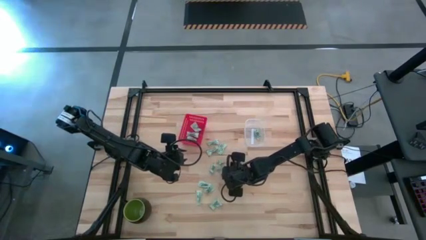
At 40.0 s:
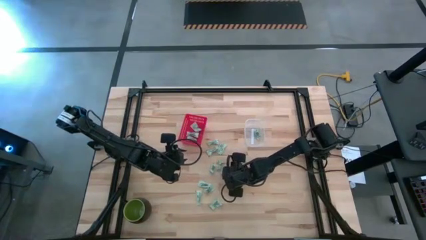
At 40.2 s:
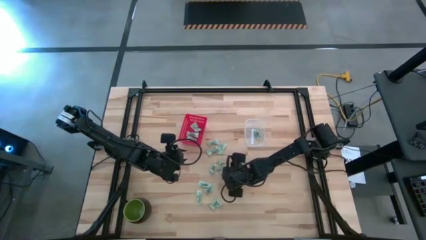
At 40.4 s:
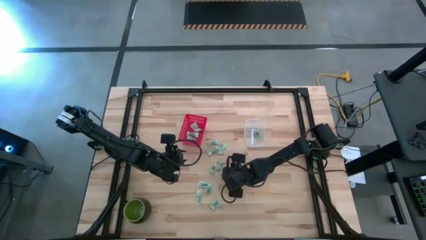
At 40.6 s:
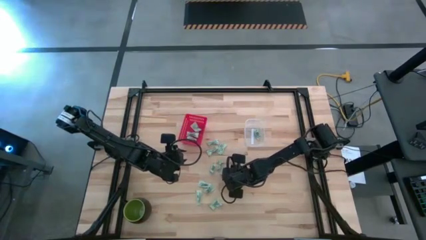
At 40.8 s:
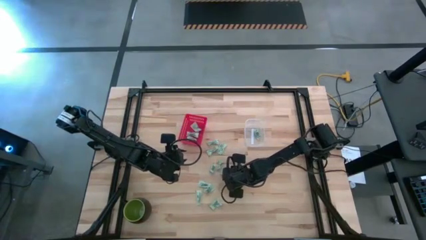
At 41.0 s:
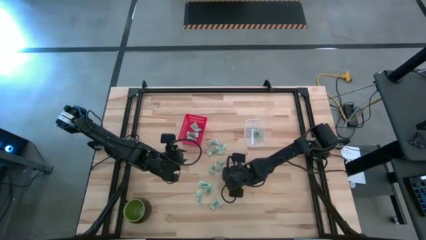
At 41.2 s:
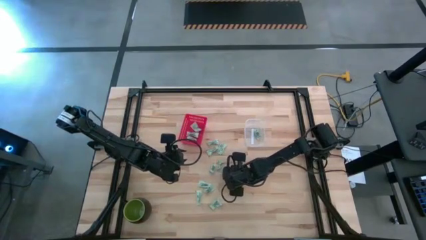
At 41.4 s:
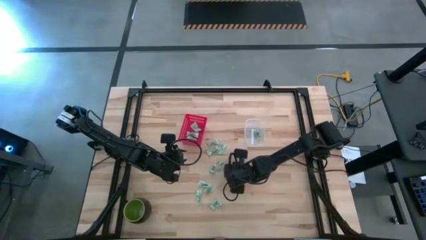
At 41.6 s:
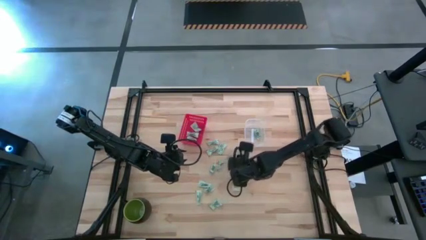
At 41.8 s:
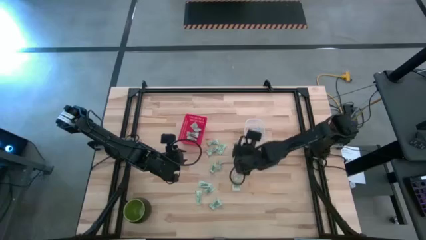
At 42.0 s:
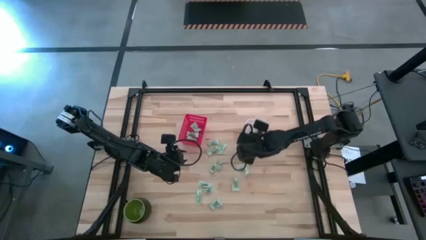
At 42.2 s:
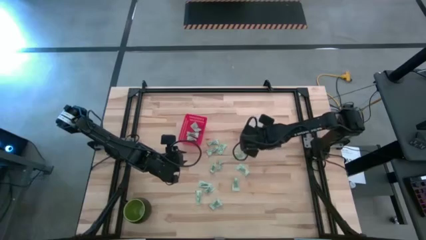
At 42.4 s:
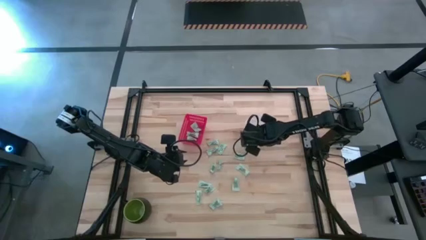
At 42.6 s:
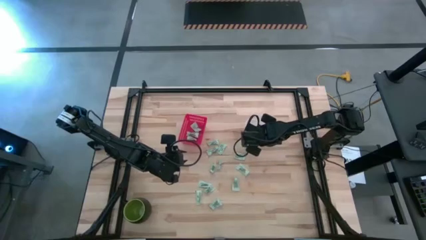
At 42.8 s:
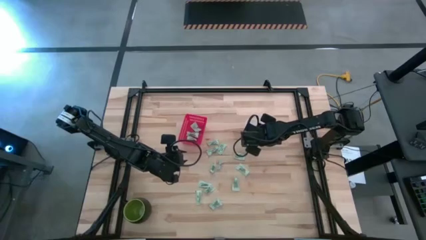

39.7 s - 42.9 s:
Task: Pick and place items into bin
Put the stevia packet into the transparent bin

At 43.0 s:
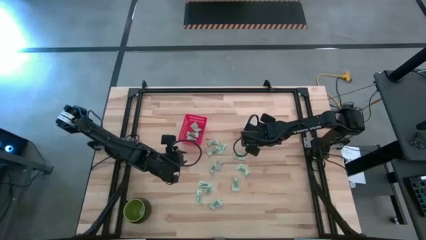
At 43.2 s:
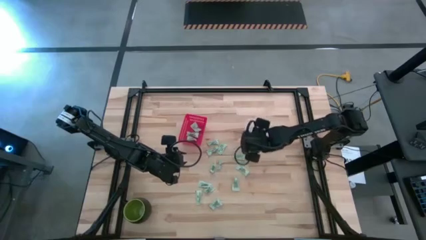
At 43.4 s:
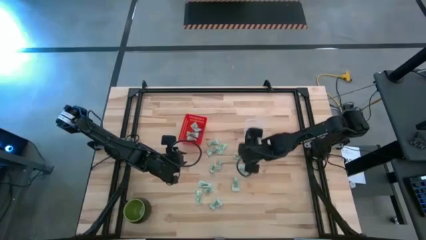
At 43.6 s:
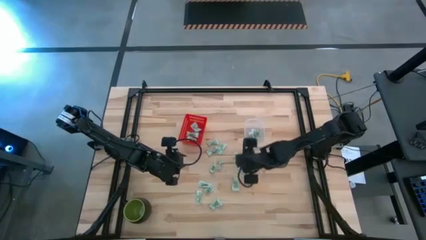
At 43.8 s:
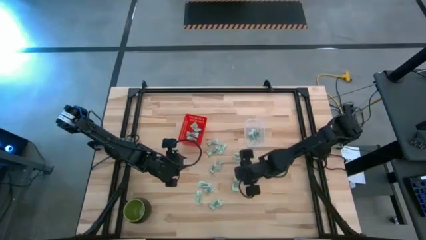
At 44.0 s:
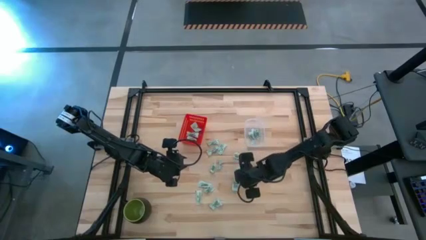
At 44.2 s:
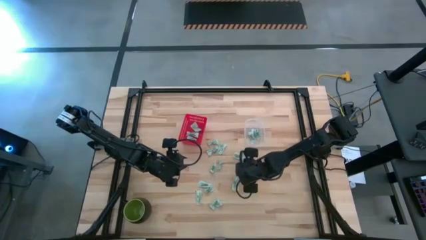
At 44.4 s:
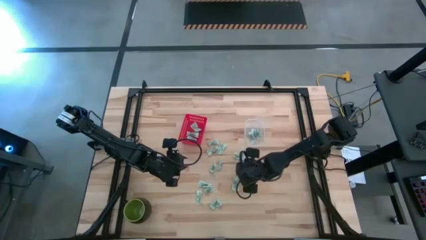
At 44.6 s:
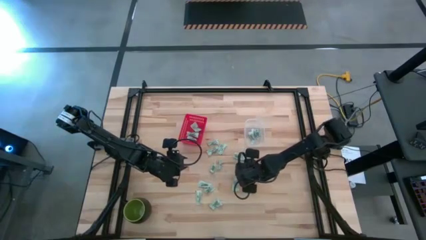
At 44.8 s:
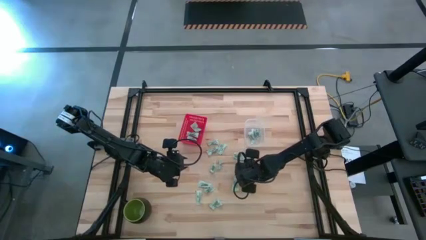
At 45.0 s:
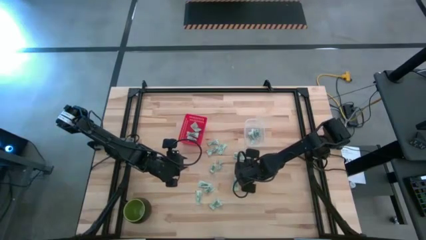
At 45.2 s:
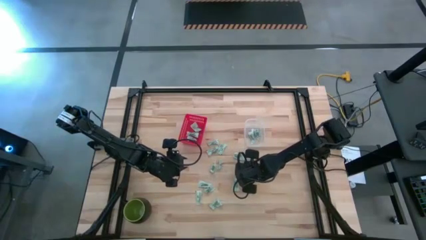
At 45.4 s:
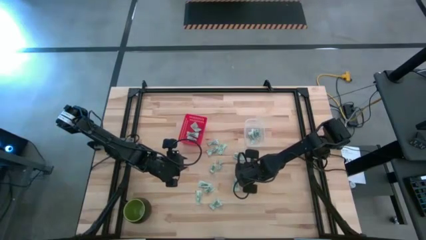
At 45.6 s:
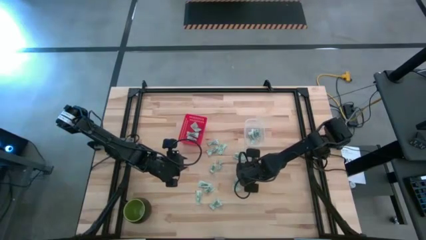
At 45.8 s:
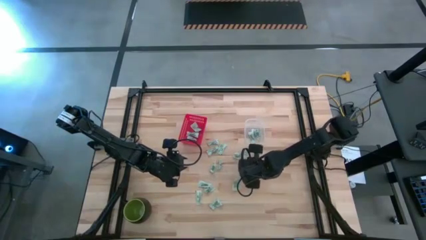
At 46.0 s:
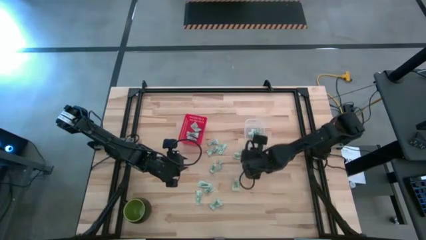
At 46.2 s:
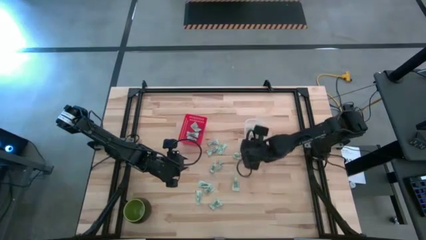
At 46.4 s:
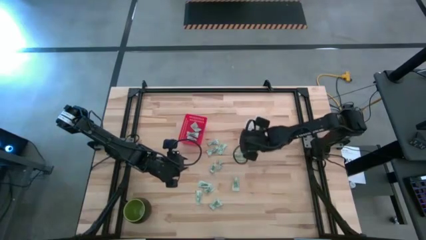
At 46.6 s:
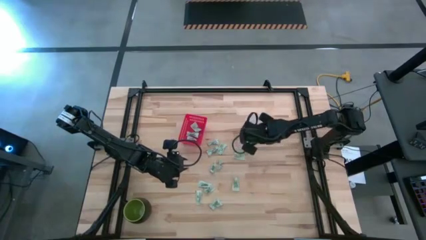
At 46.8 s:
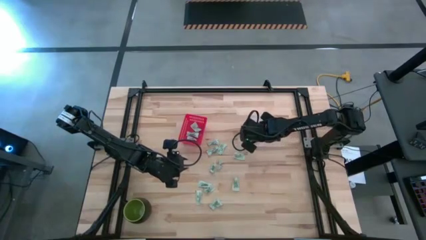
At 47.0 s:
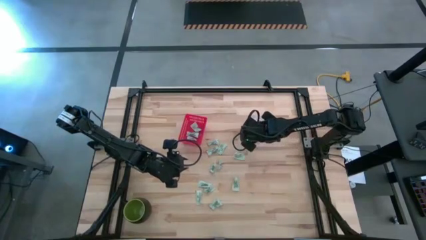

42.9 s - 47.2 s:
Put the stevia packet into the transparent bin

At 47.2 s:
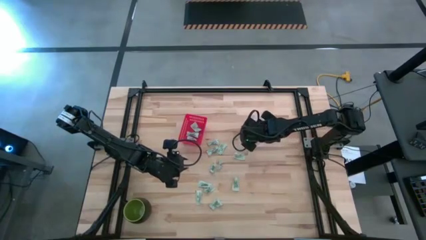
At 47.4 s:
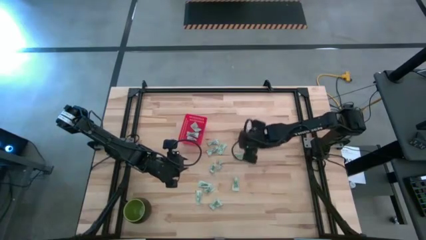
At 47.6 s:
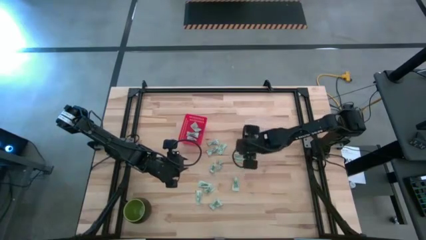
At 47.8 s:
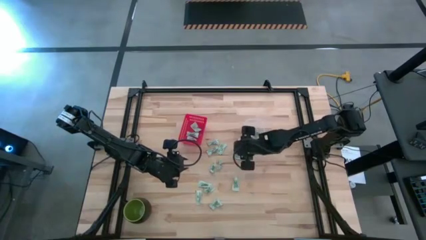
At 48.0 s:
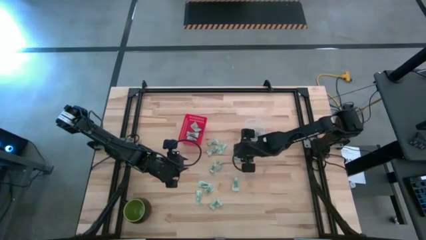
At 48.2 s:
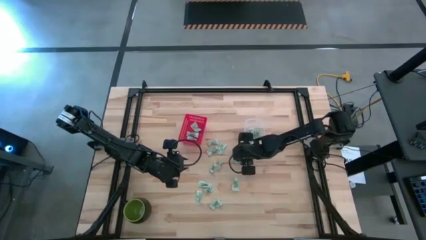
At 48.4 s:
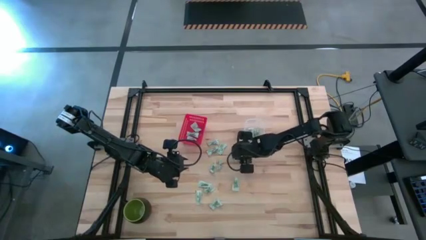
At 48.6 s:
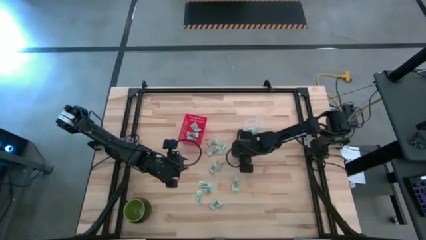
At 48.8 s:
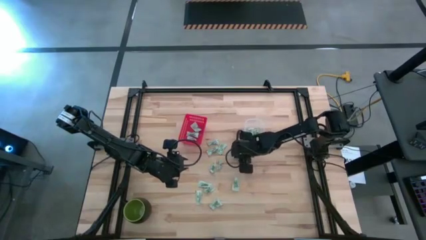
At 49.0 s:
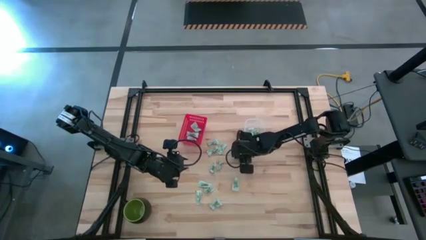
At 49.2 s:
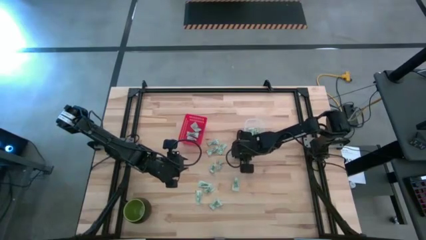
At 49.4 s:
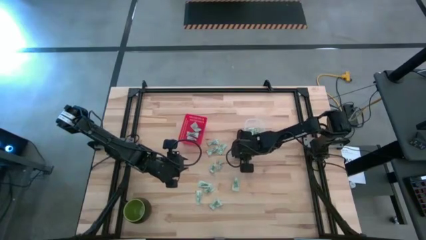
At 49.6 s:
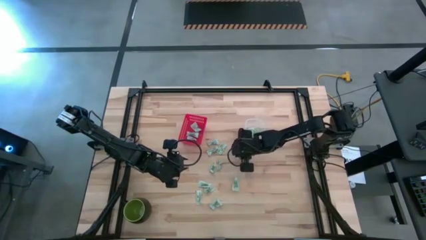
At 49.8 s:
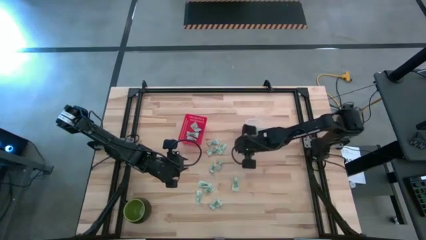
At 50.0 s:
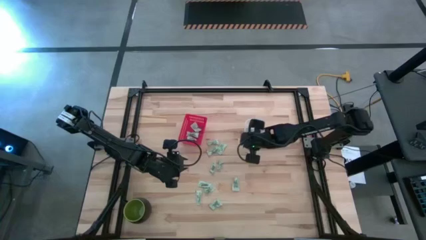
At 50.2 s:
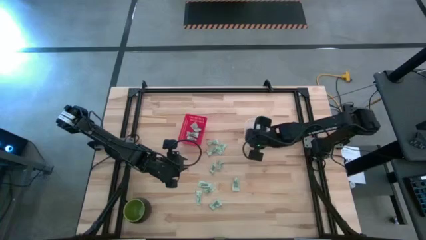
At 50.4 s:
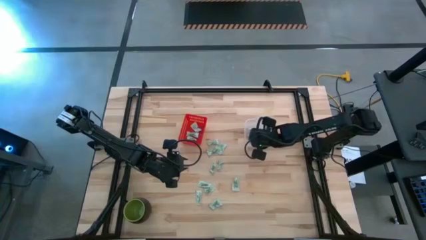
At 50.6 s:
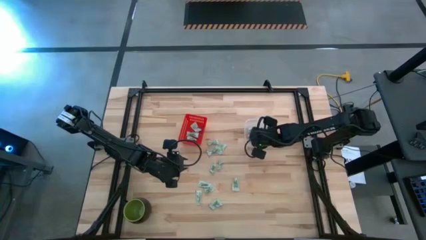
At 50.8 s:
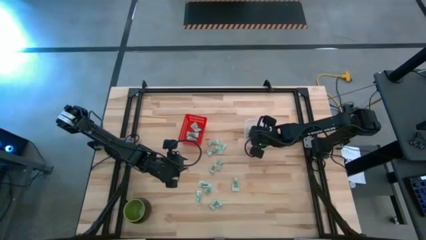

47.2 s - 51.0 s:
Put the stevia packet into the transparent bin

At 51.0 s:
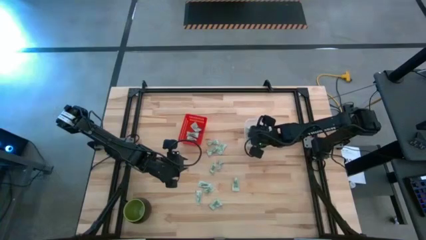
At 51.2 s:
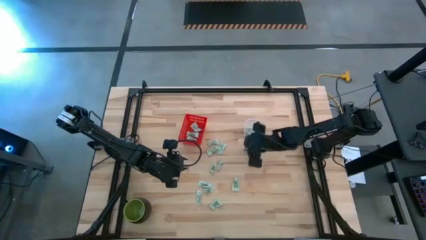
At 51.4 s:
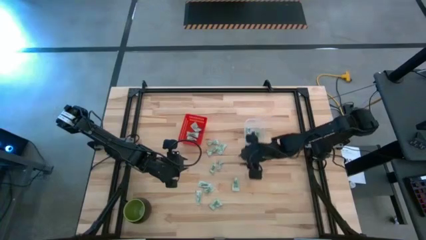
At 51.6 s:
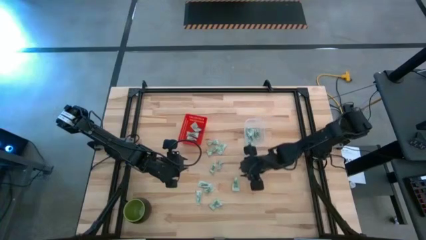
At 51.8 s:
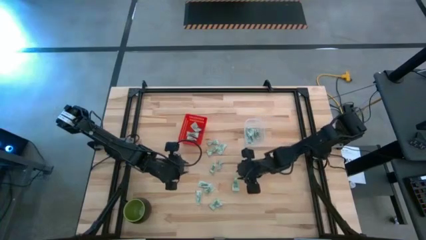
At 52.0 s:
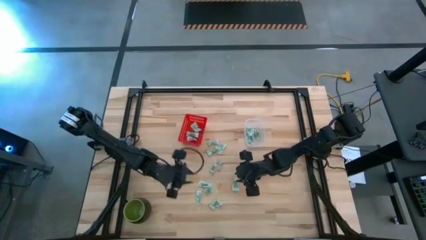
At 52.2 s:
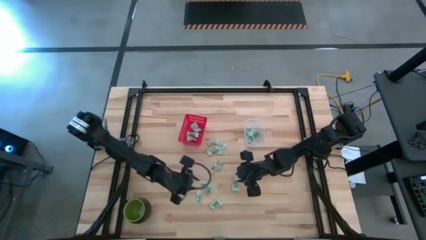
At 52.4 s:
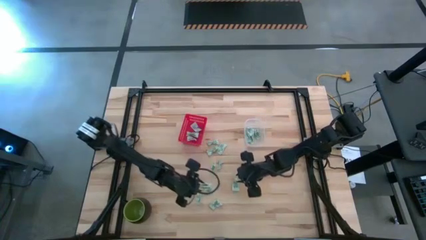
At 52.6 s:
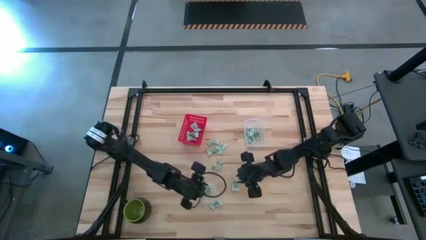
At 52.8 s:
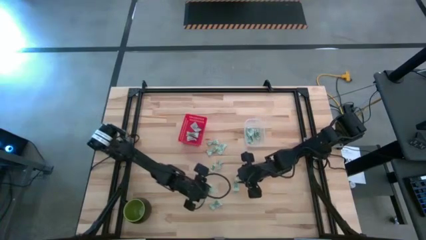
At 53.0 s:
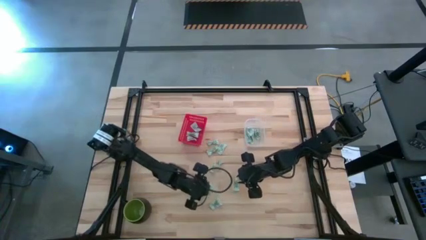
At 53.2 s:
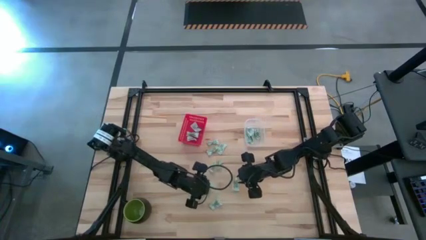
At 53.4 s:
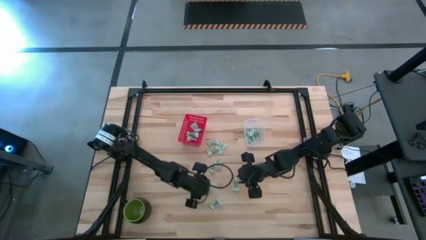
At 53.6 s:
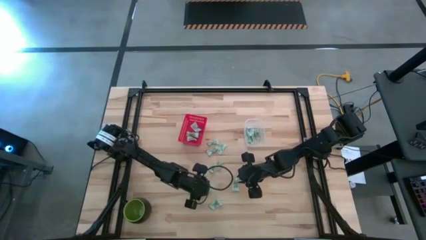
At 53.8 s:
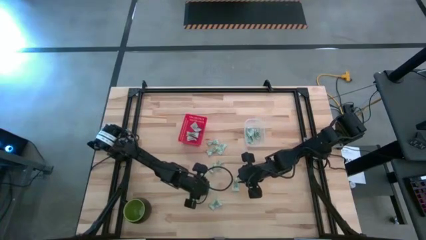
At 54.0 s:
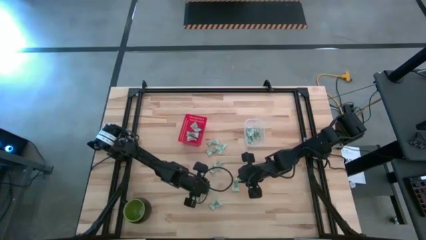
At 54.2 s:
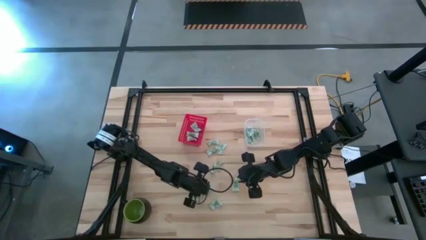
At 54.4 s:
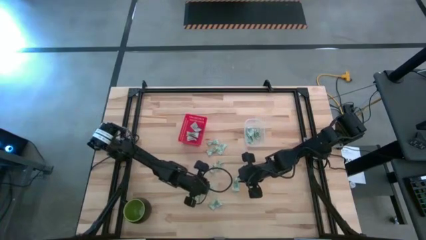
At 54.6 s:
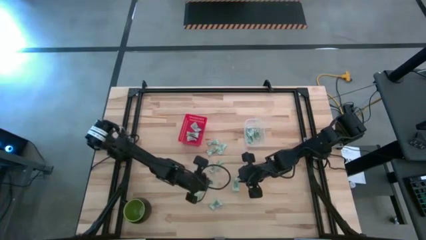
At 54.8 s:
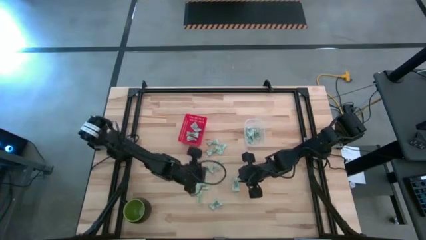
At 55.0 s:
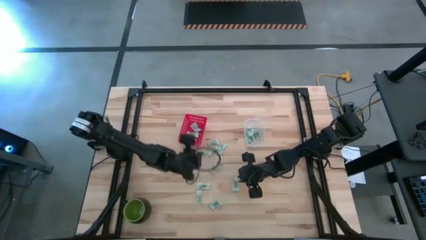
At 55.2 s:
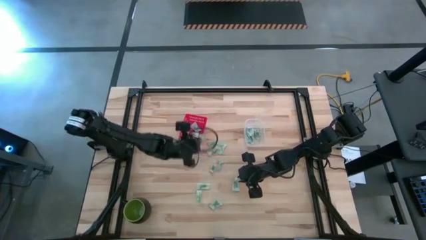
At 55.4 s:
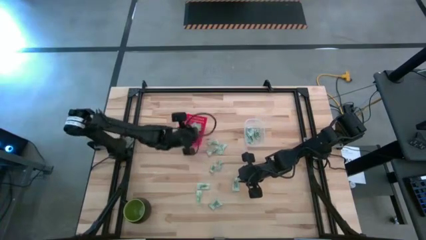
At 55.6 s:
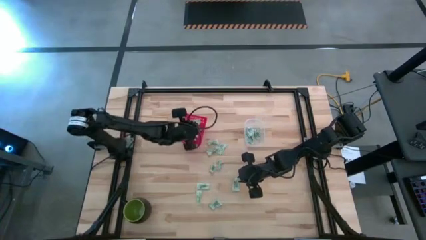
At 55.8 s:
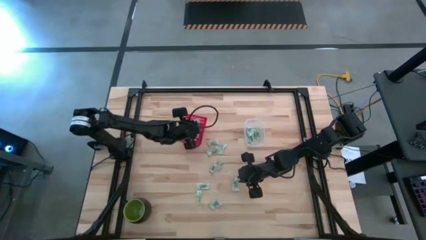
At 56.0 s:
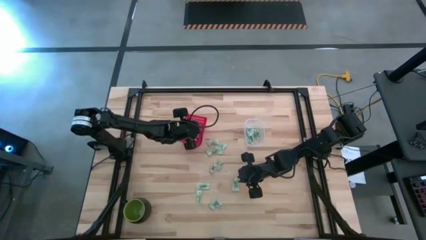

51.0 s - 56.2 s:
Put the stevia packet into the red bin

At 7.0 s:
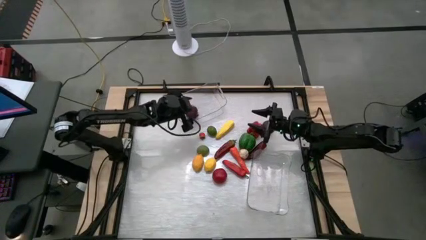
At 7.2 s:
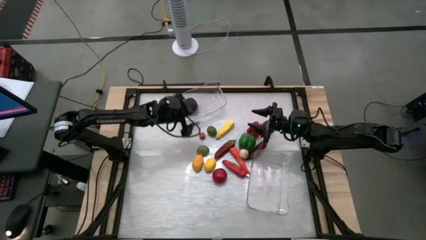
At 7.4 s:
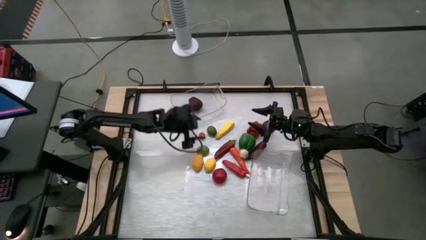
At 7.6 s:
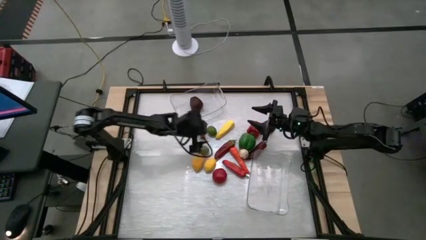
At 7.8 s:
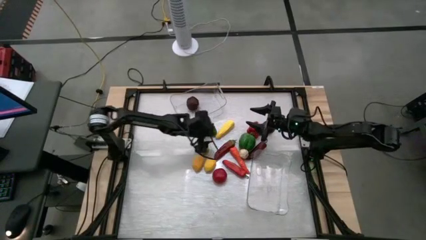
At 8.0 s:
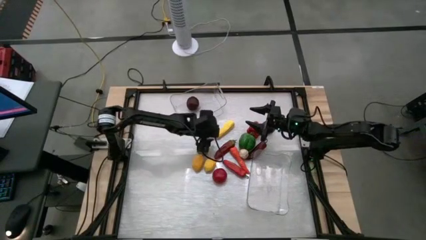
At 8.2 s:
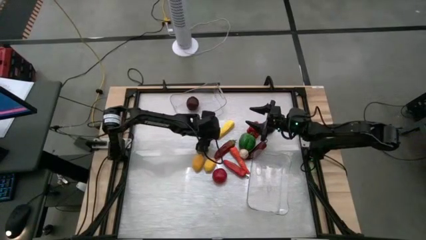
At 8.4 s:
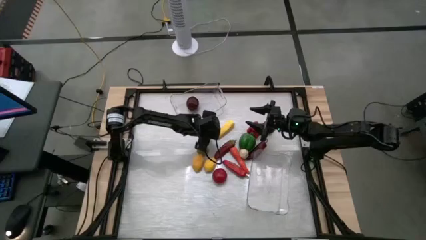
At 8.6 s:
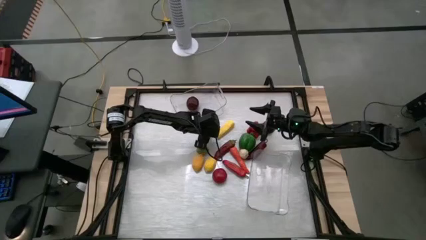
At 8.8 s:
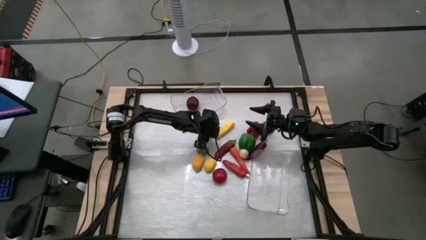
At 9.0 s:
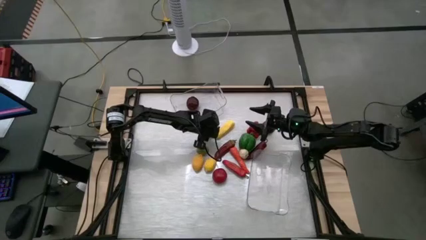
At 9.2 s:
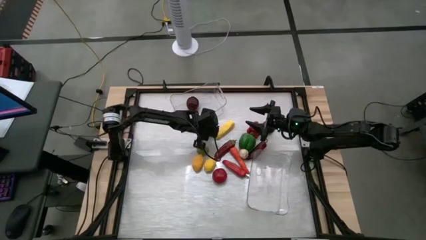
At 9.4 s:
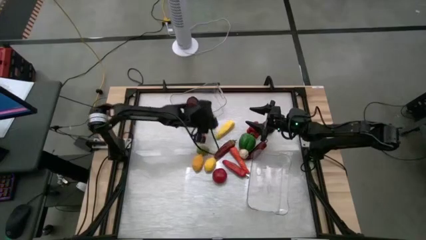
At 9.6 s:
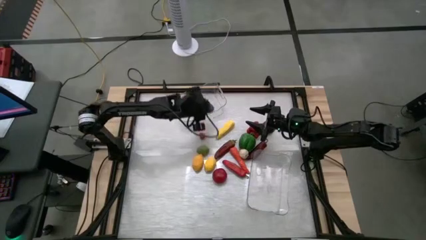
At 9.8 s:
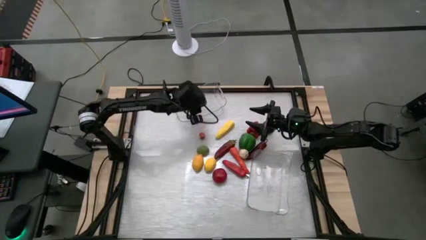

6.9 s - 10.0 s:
Task: Sort produce into baskets
Put the top green lime into the top transparent bin
